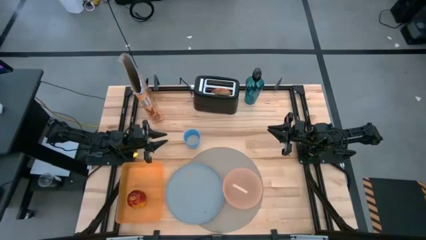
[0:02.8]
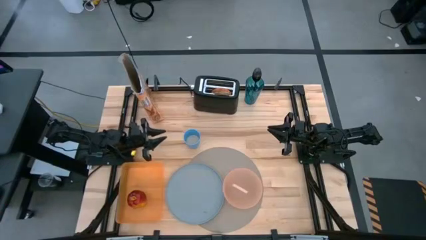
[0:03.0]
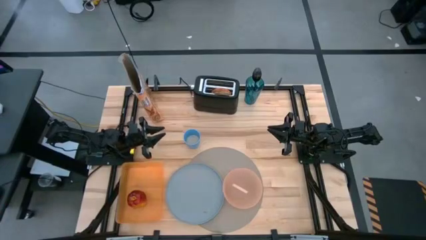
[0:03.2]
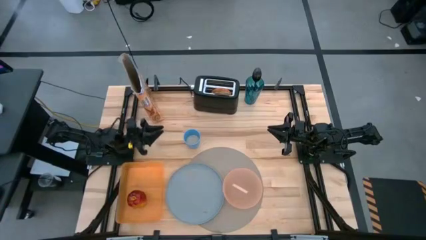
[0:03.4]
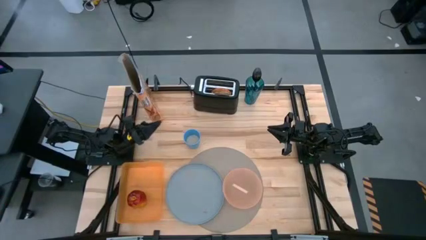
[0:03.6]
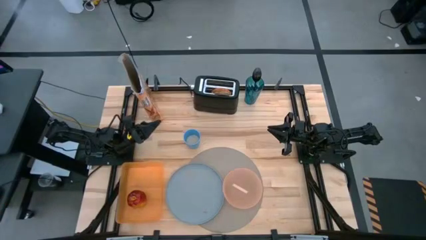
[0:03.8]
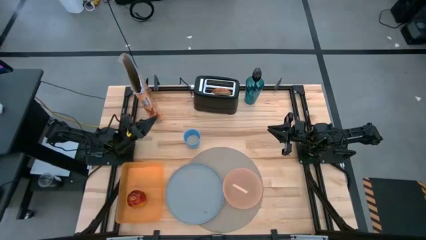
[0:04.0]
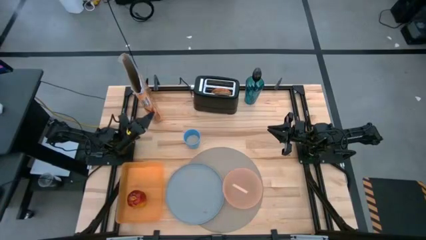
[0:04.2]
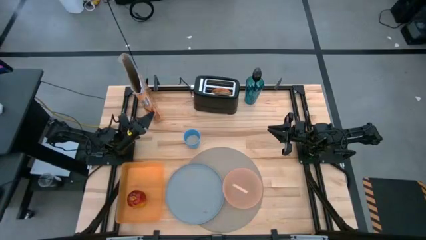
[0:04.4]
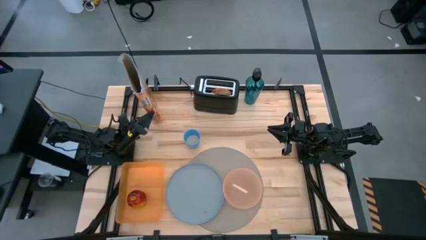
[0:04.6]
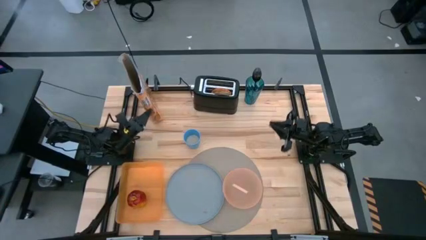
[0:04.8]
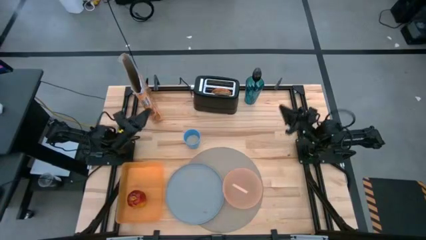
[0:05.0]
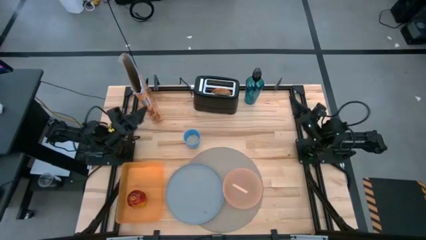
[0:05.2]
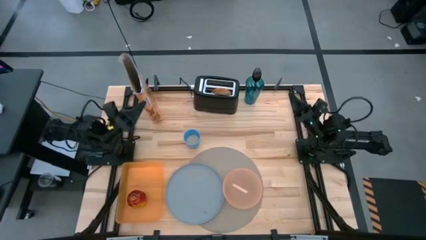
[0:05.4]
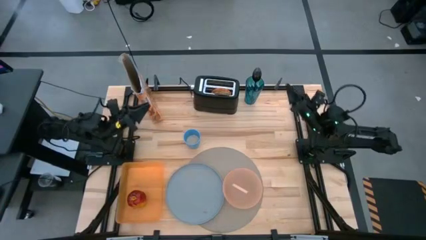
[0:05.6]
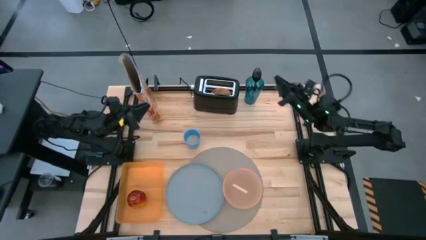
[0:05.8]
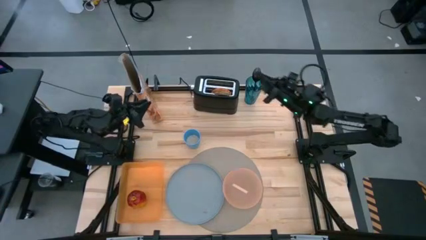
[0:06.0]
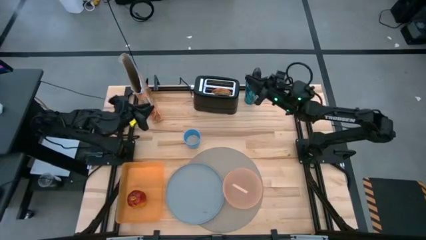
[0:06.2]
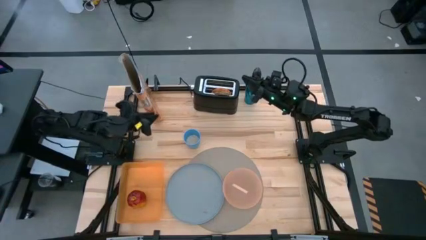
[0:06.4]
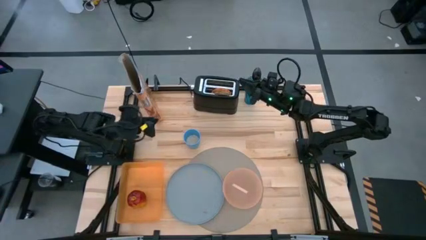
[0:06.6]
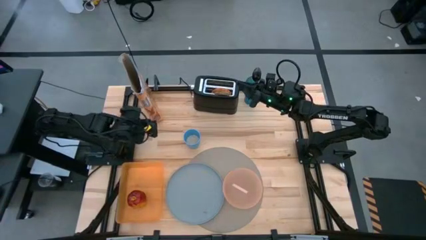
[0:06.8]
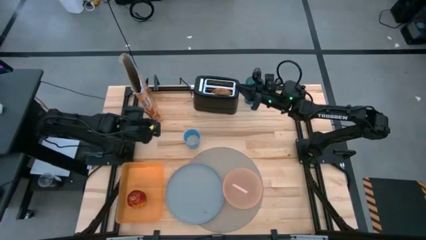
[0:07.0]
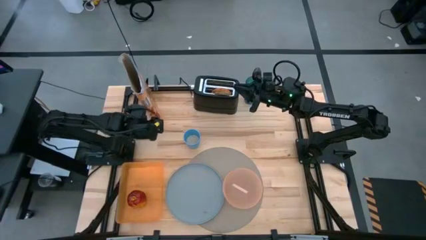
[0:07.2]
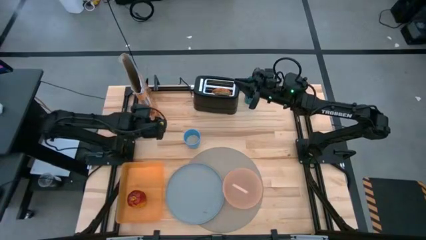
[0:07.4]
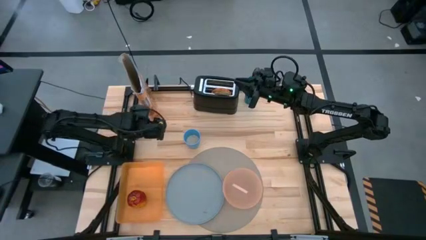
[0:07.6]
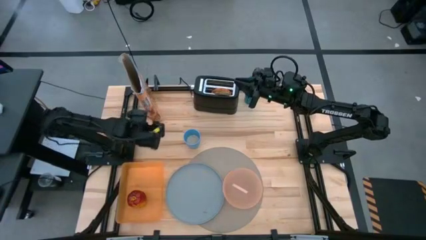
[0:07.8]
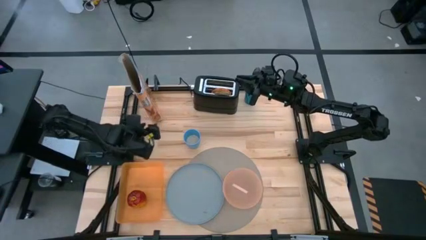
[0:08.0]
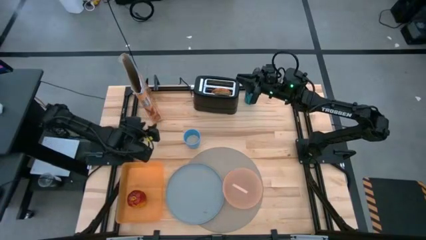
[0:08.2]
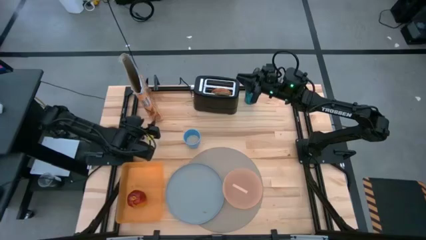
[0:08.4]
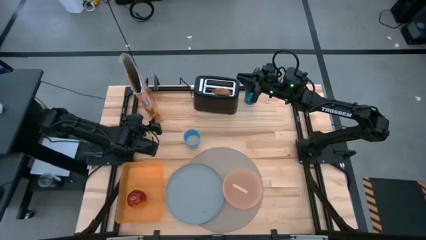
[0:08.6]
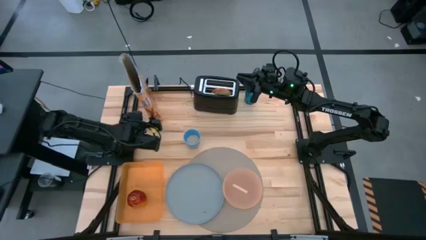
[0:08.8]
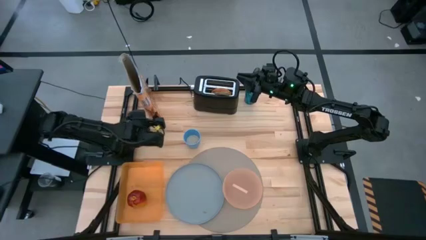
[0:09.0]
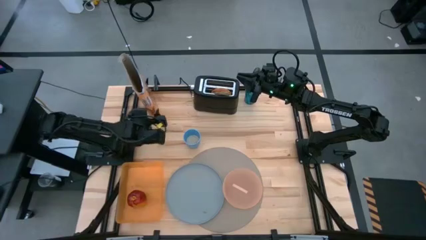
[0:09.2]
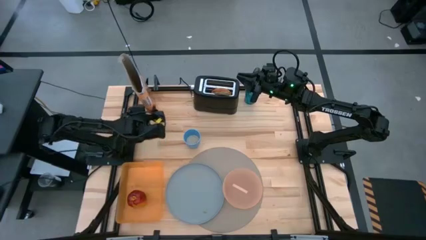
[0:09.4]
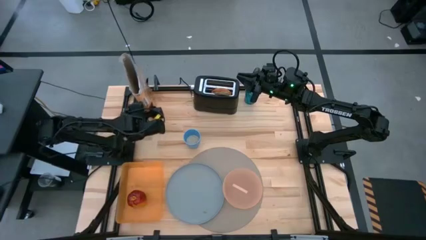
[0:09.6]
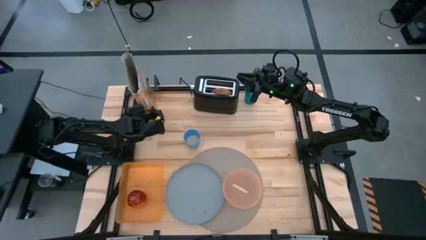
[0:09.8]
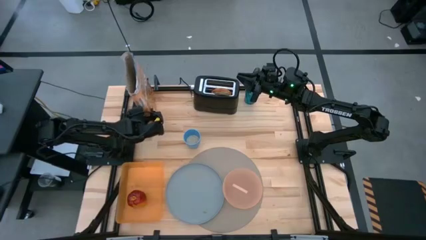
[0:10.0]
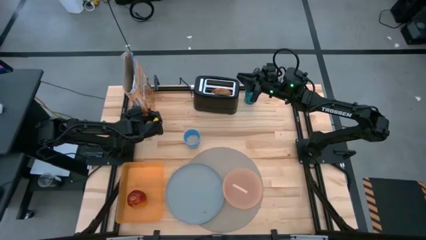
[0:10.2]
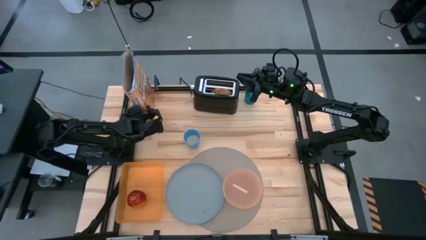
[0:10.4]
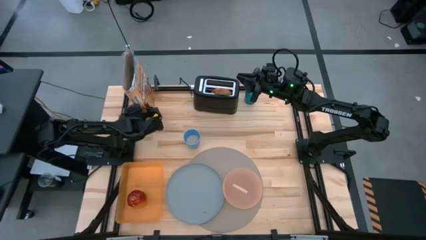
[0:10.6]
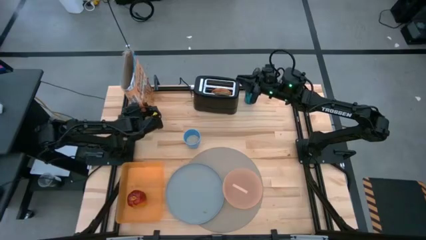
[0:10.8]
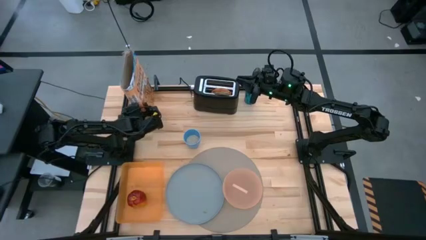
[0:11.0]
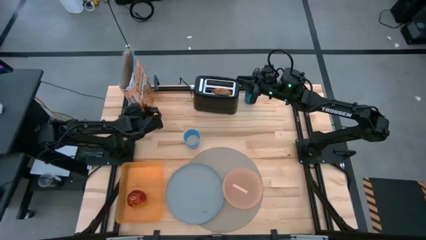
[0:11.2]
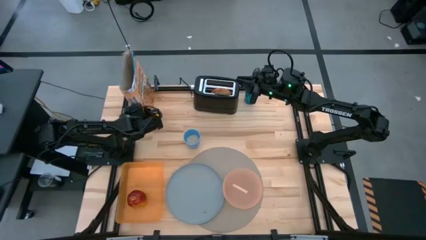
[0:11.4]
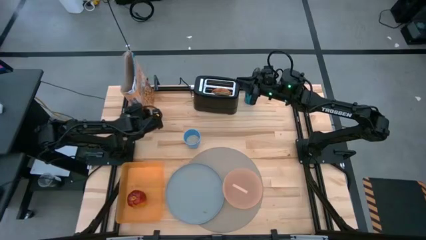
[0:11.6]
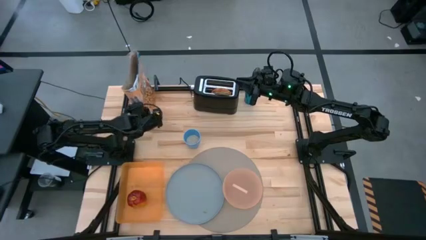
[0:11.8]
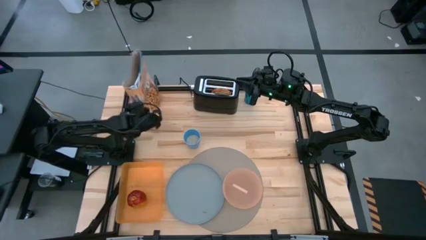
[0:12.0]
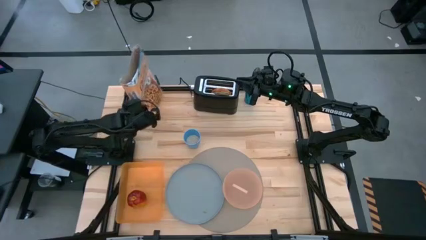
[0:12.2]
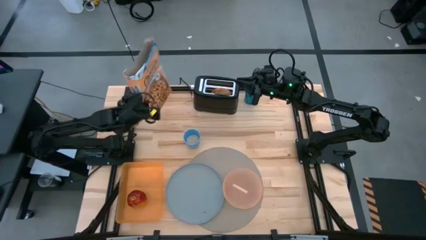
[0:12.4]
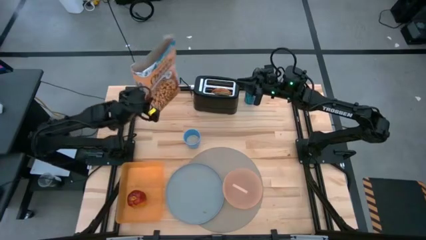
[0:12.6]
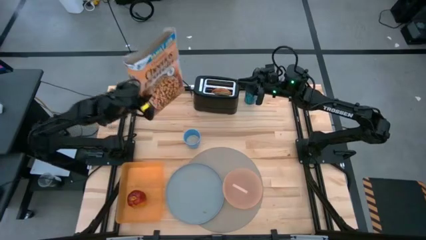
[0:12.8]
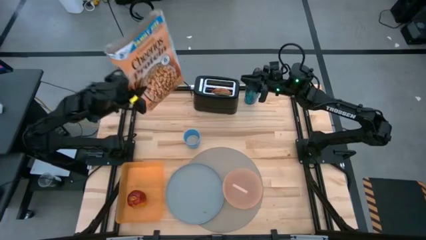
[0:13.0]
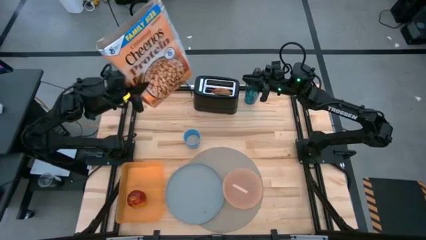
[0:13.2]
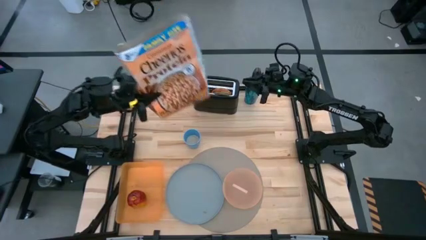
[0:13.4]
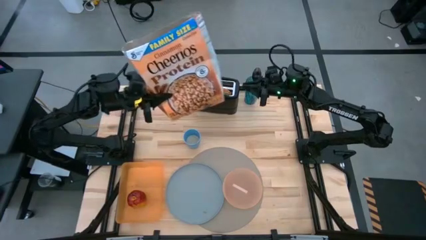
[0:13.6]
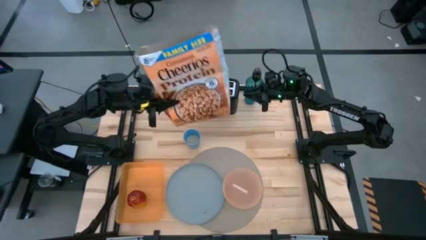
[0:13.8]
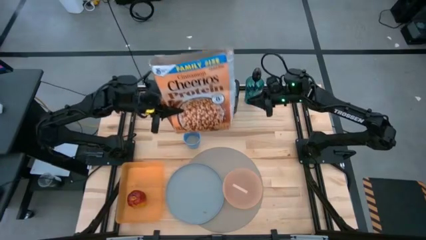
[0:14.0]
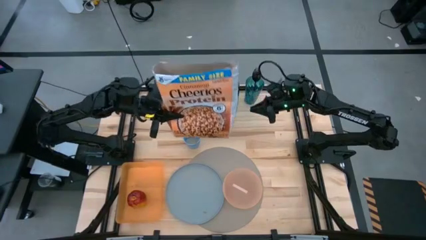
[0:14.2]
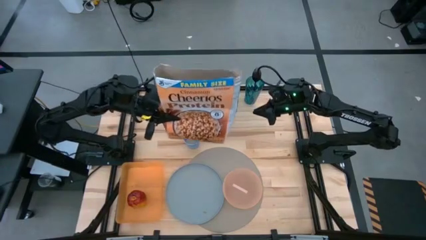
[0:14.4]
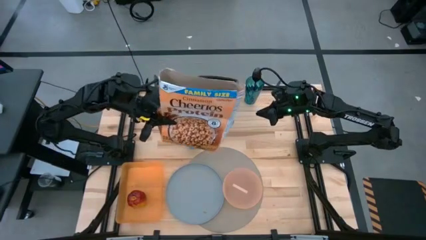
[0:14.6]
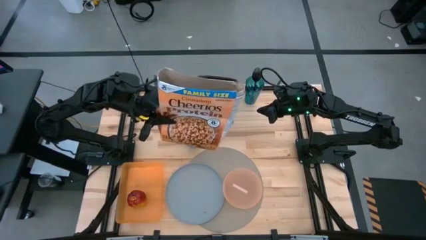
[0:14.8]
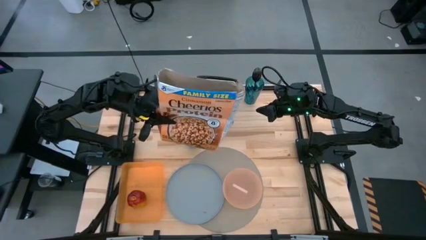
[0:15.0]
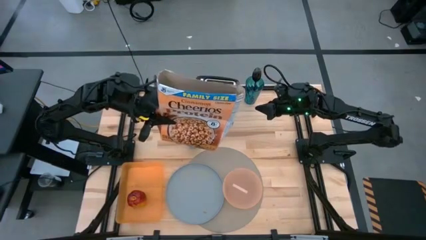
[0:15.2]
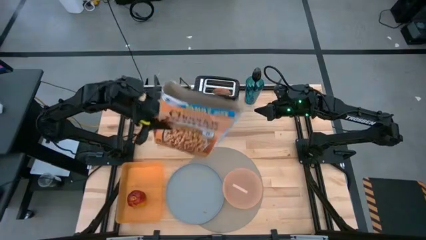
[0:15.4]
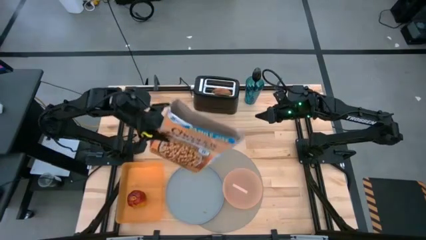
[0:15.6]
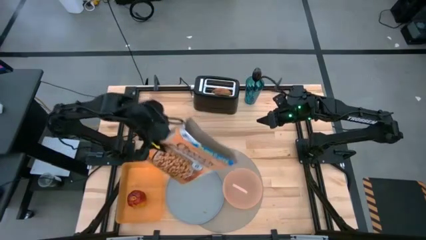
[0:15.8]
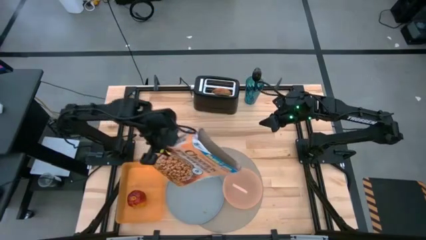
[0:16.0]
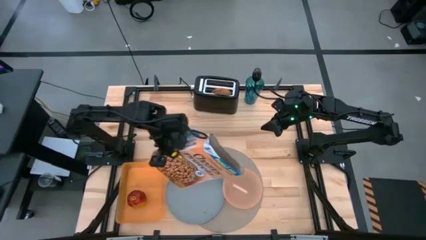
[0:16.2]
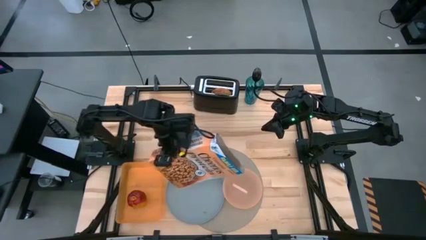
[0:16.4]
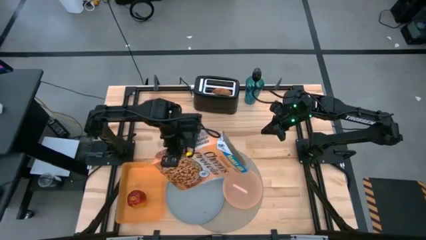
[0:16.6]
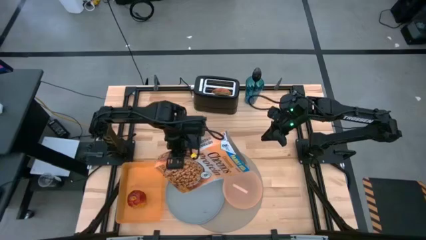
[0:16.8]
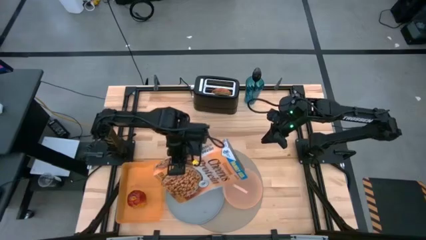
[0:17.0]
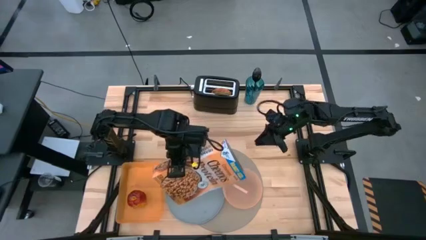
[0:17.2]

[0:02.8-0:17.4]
Task: Arrange a breakfast setting
Pour the cereal into the light pink bowl
